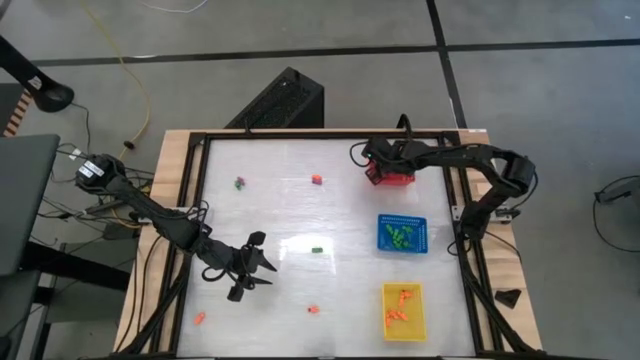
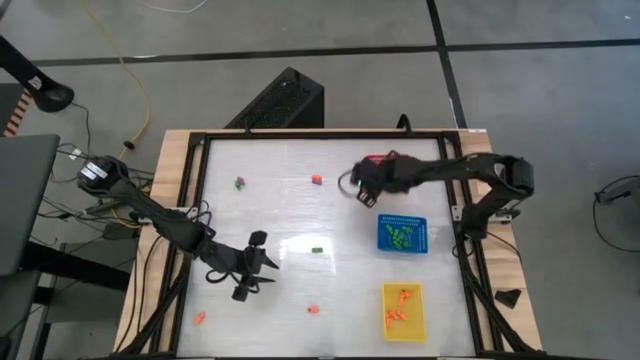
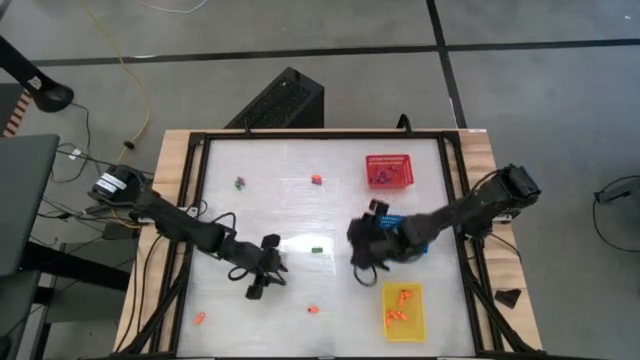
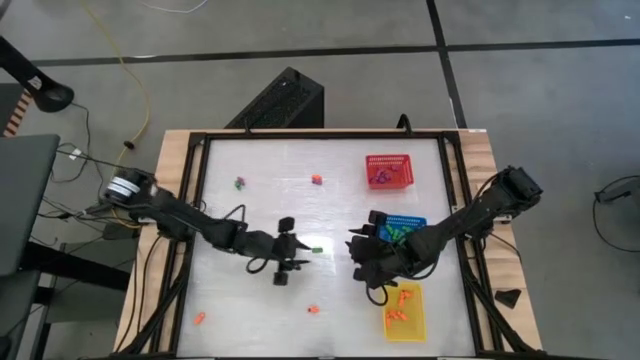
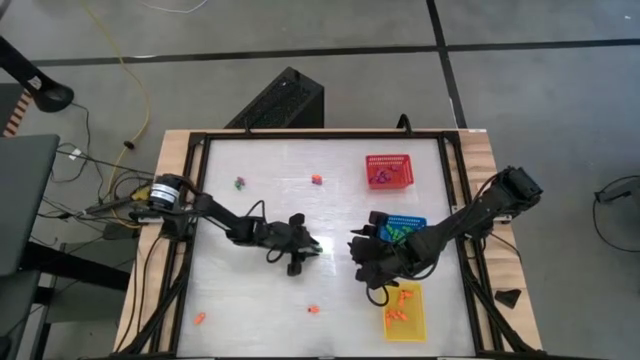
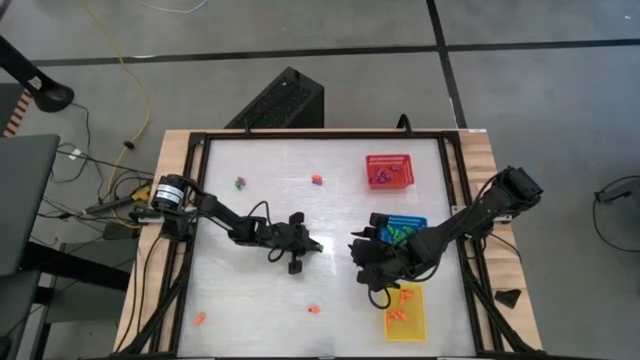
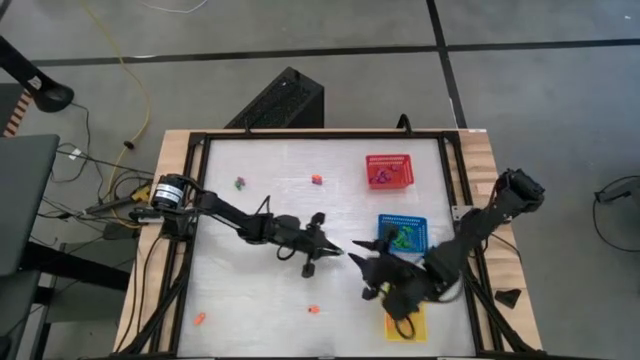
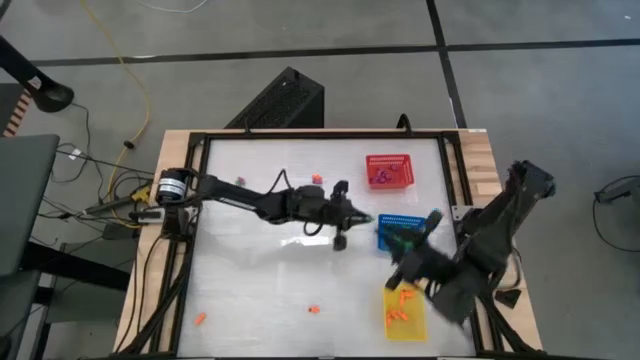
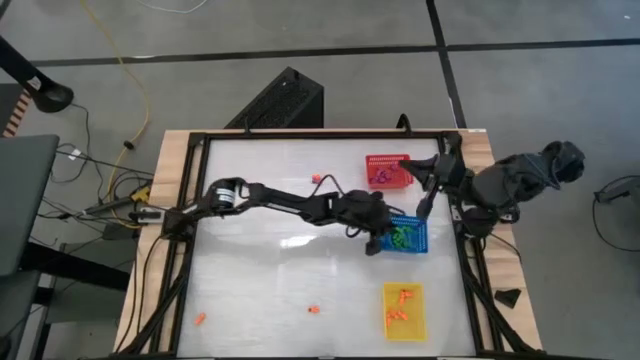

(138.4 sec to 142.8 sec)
Task: Sort Halloween decoration
Put the green skeleton toy into the blue basket

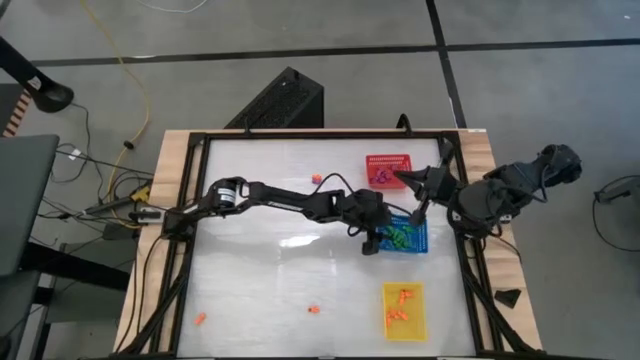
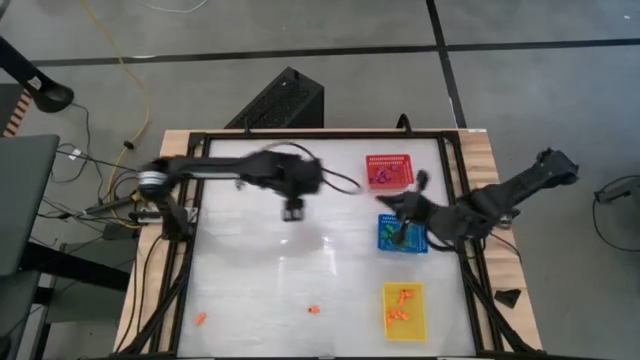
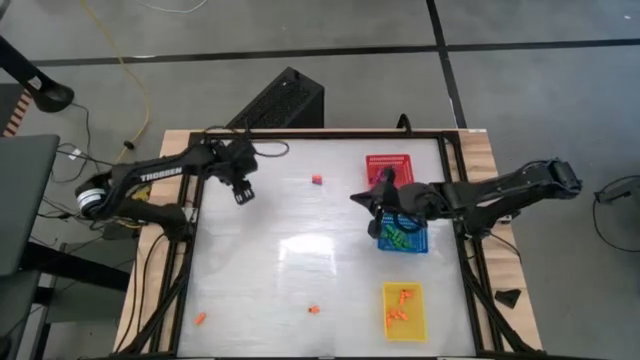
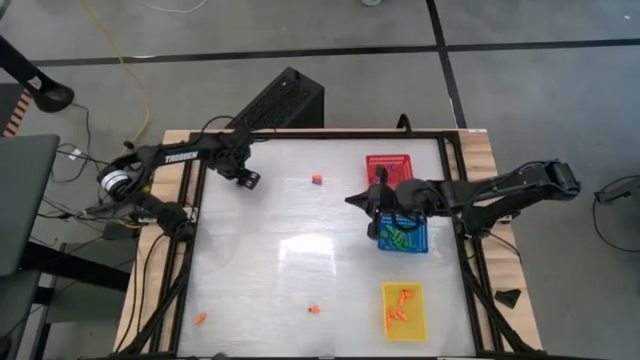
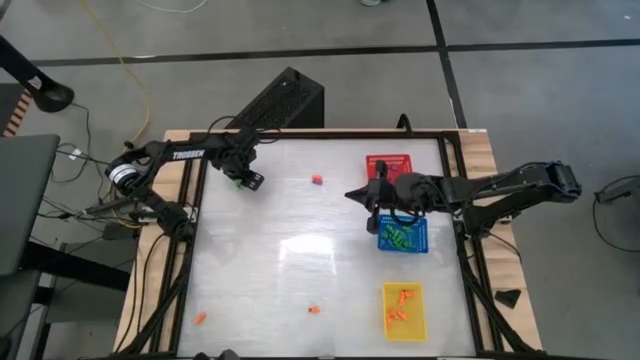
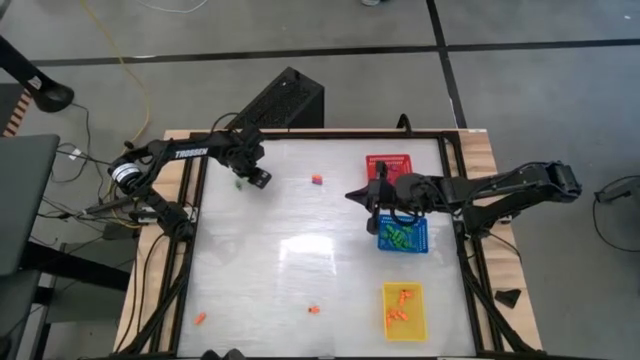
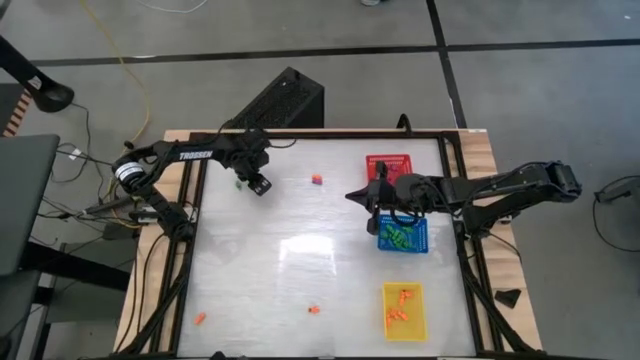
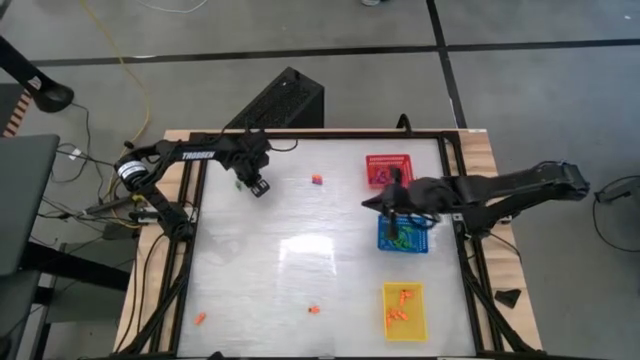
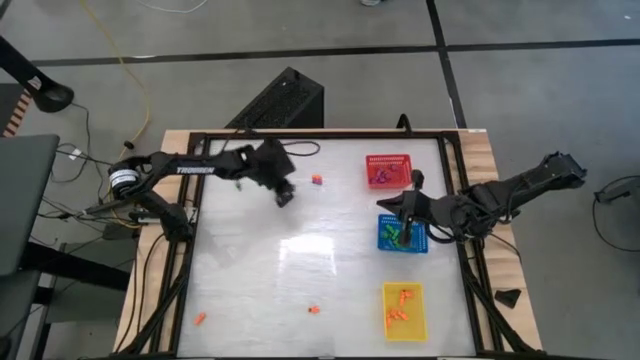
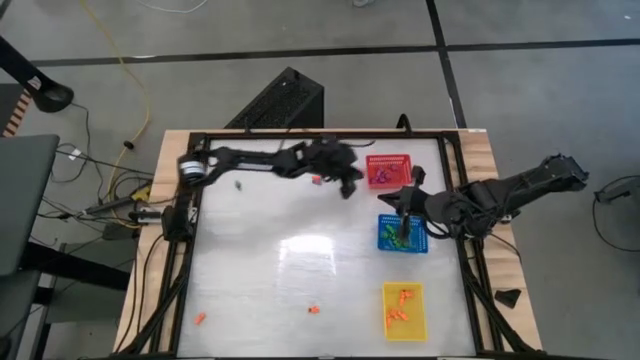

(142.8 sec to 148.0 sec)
Put the violet skeleton toy into the red basket

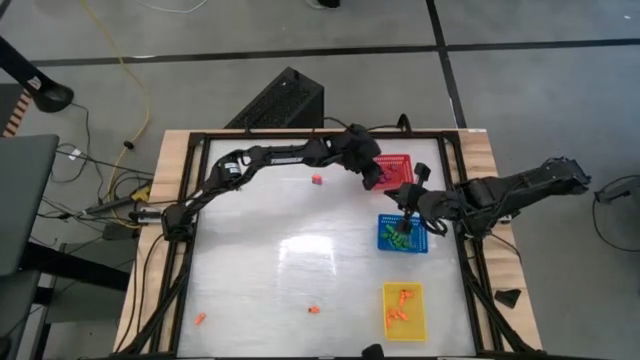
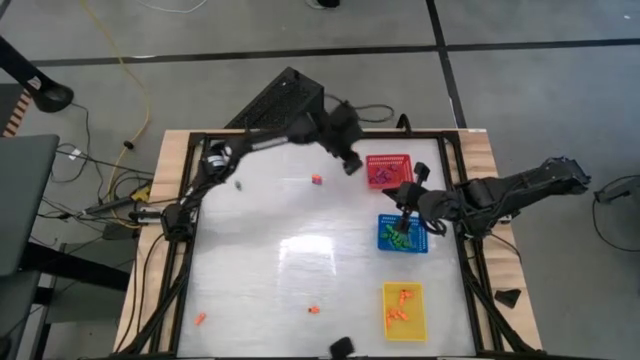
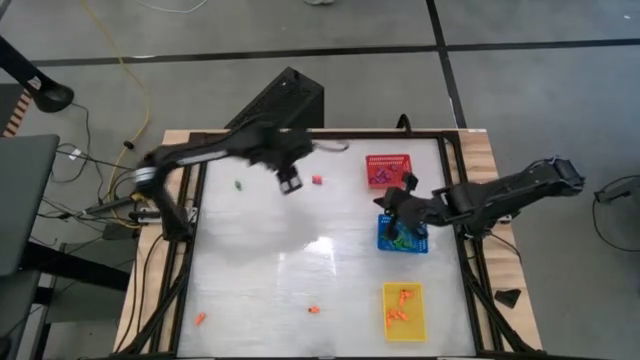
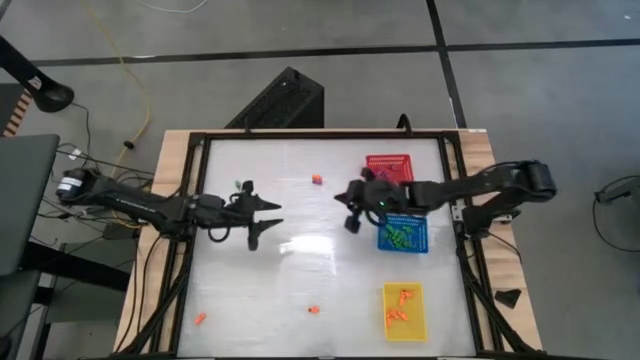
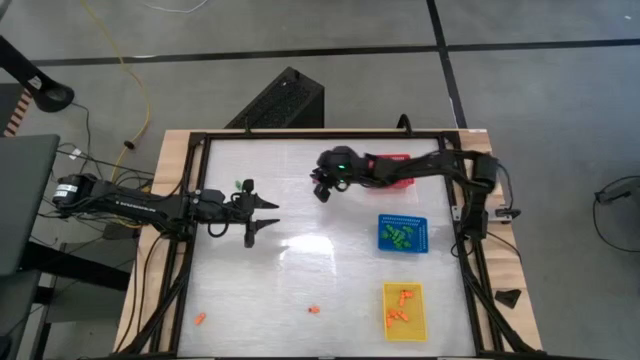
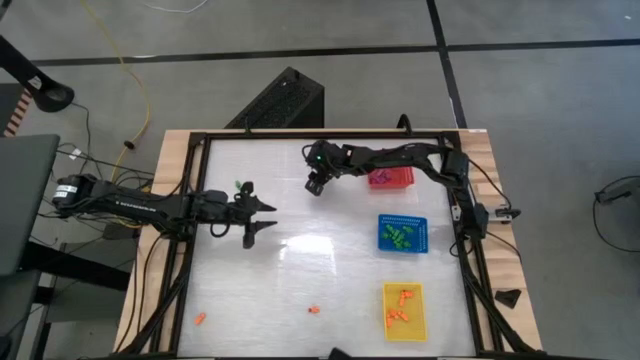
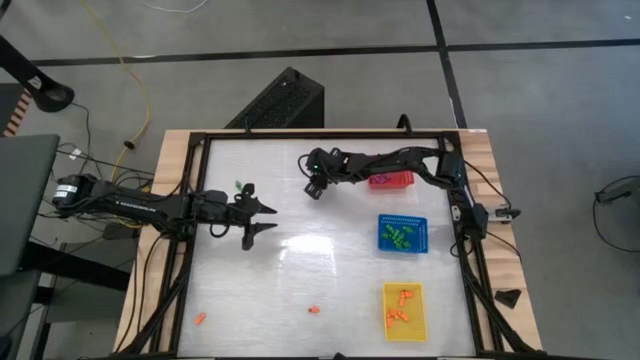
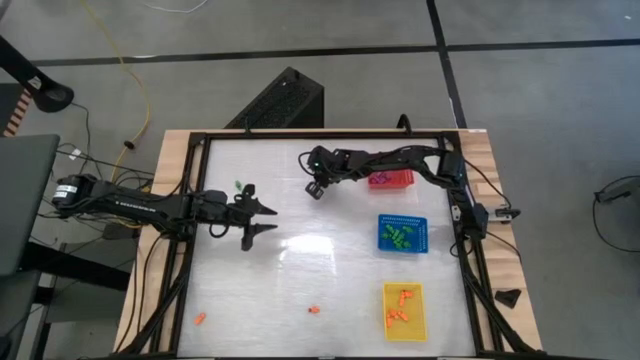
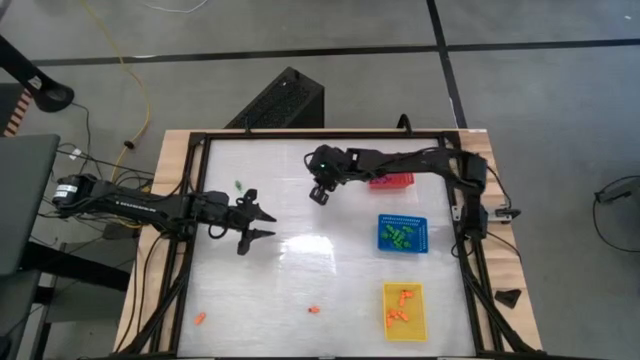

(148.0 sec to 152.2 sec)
Put the orange skeleton toy into the yellow basket

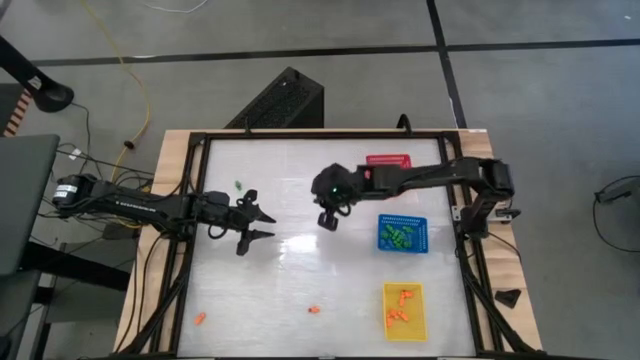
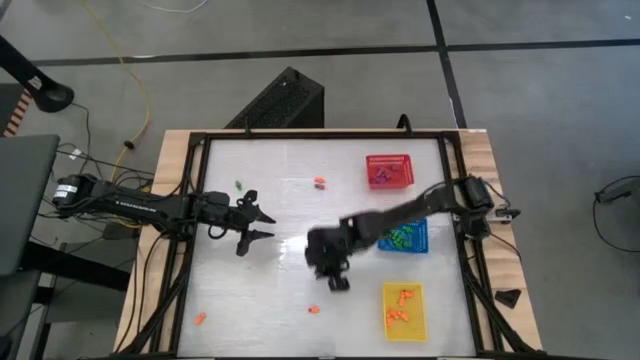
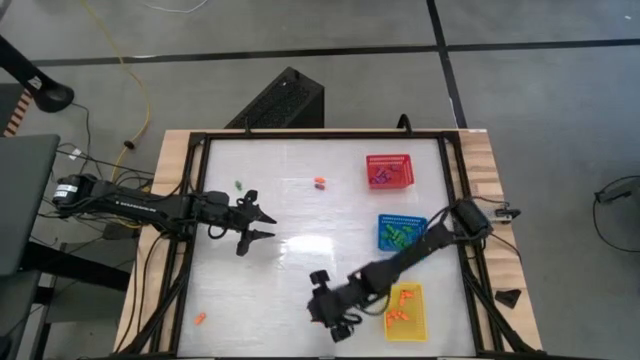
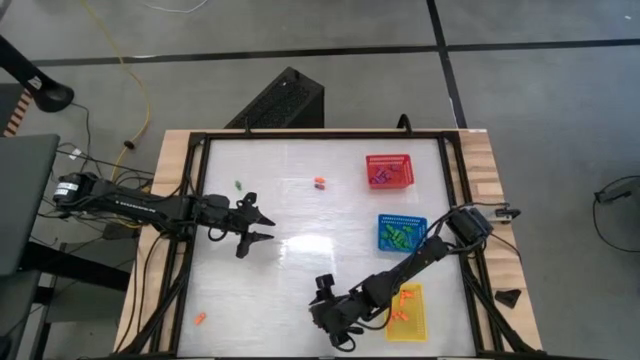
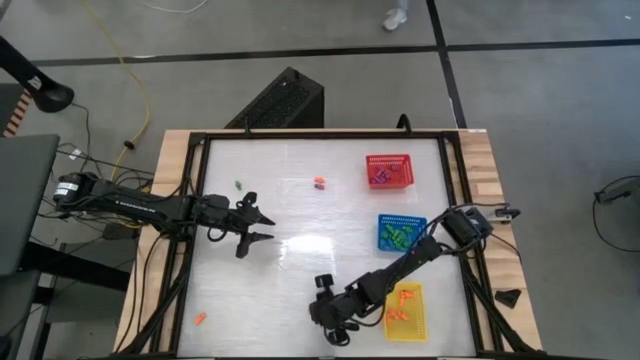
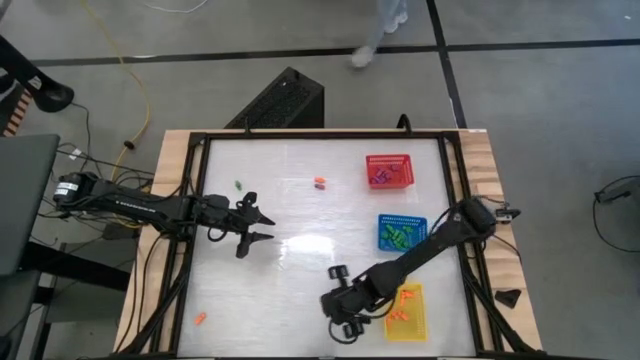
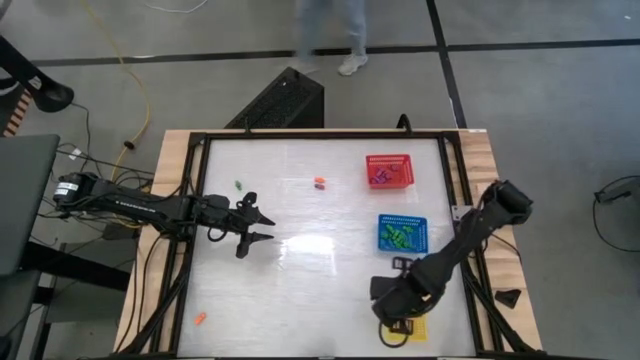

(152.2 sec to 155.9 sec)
Put the orange skeleton toy into the yellow basket

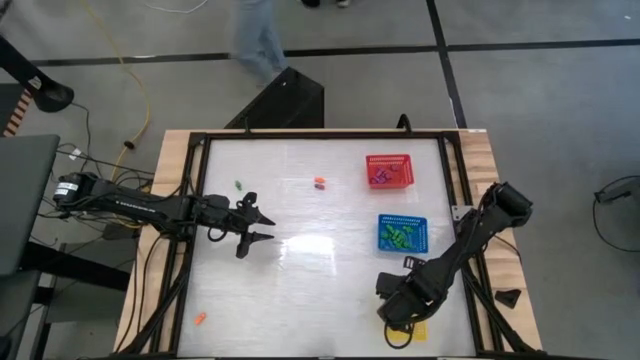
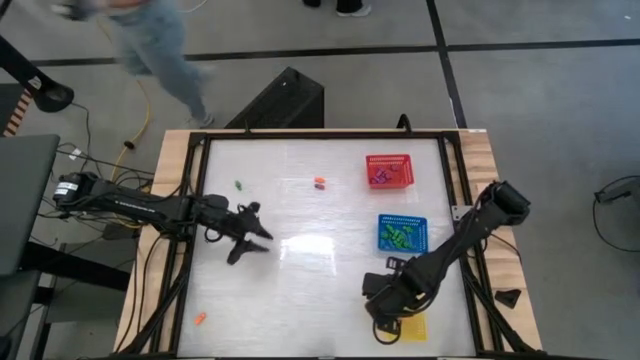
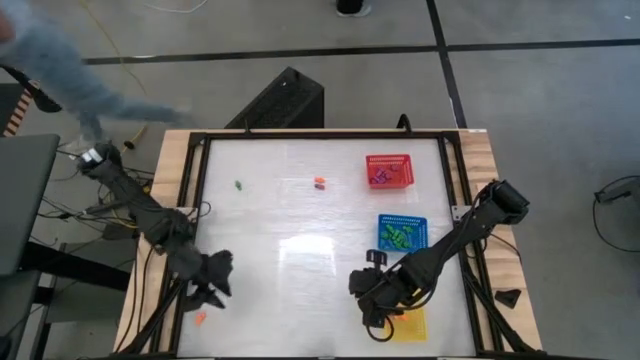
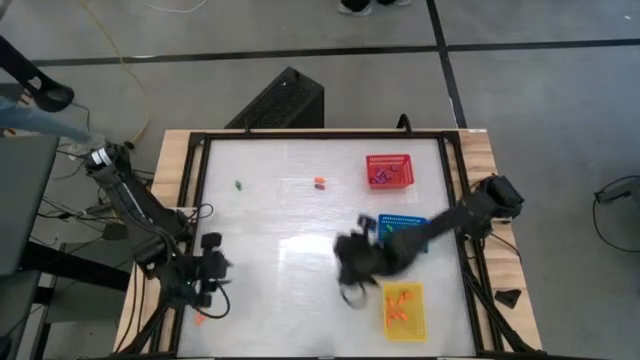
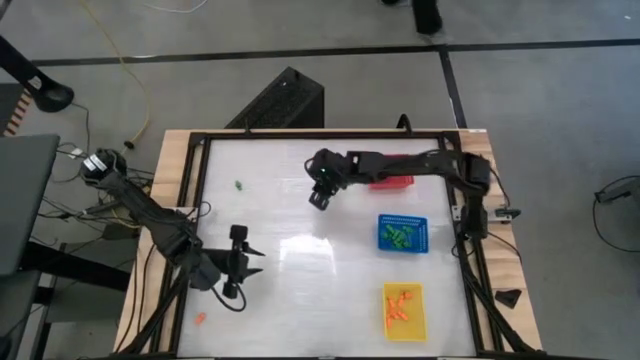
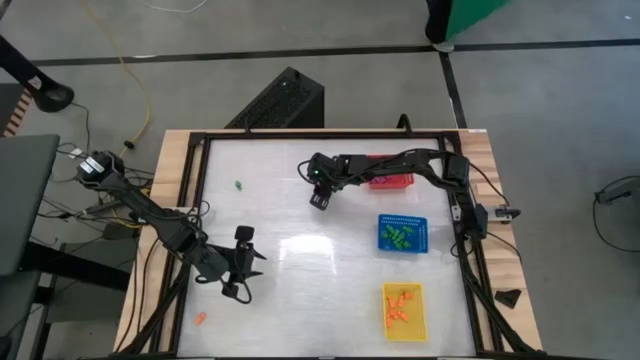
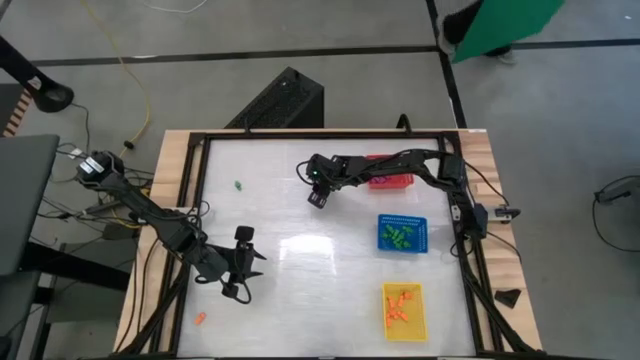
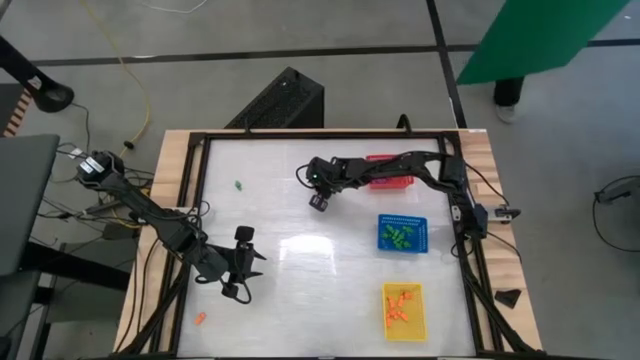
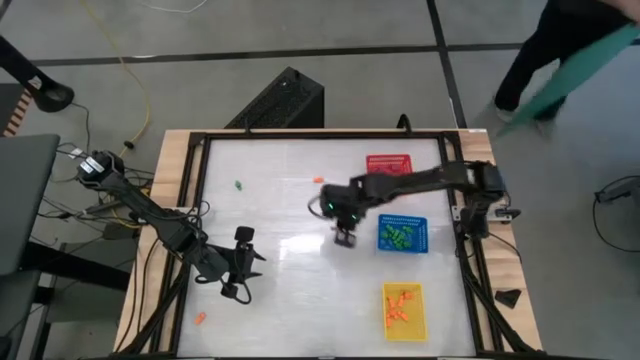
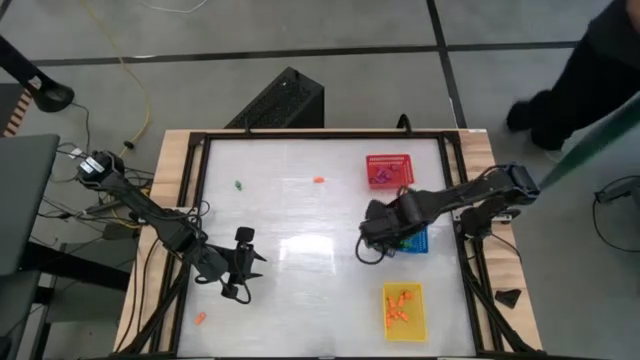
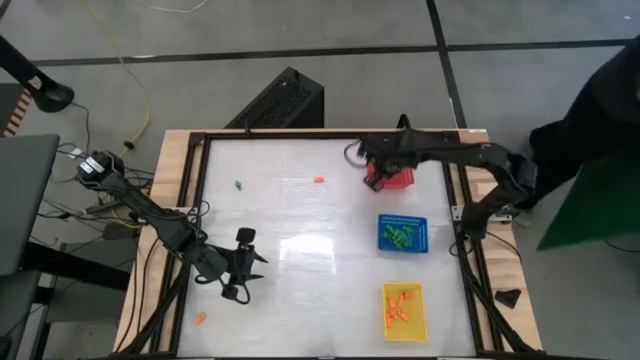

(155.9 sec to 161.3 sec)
Put the violet skeleton toy into the red basket
